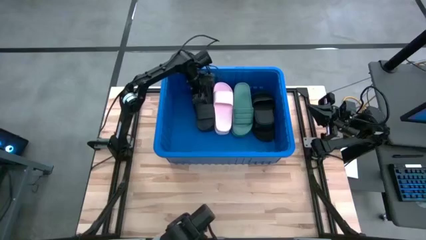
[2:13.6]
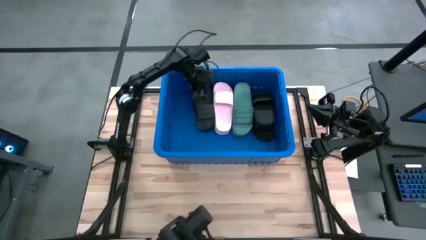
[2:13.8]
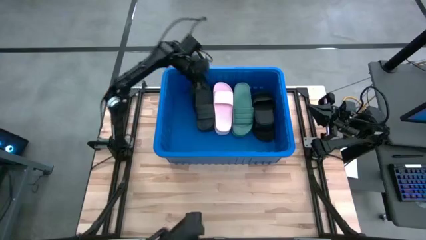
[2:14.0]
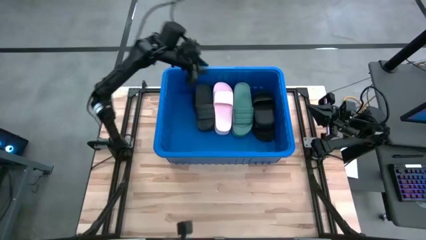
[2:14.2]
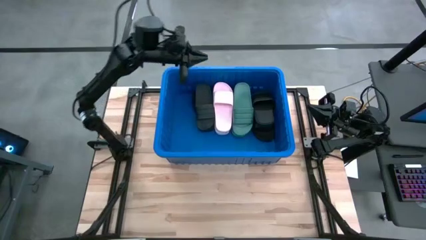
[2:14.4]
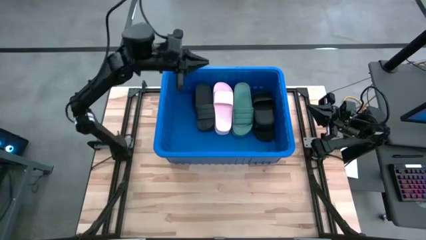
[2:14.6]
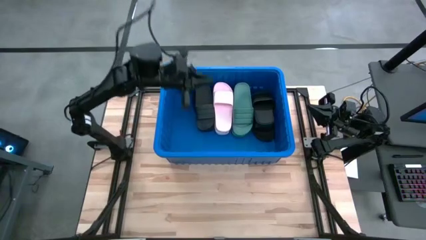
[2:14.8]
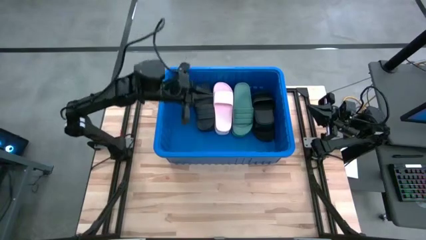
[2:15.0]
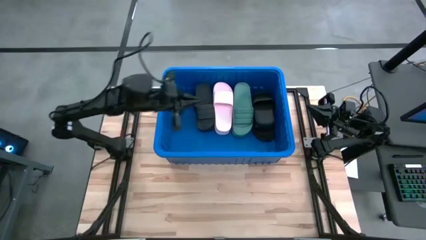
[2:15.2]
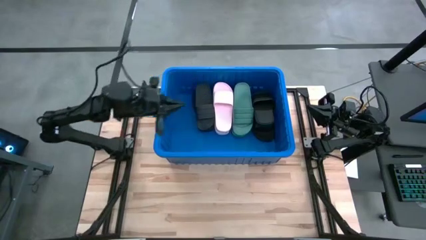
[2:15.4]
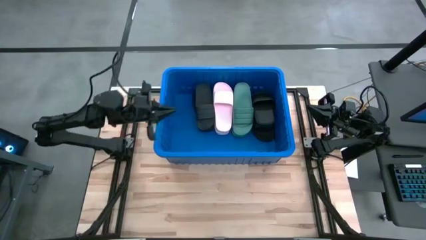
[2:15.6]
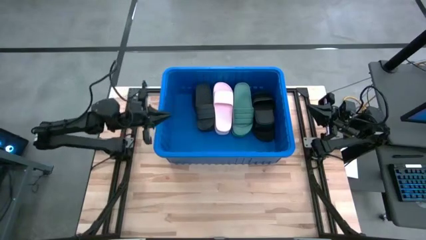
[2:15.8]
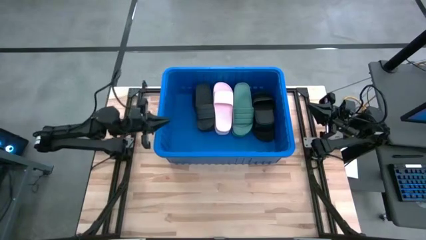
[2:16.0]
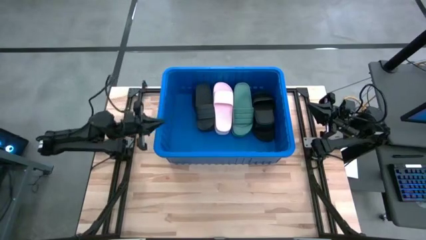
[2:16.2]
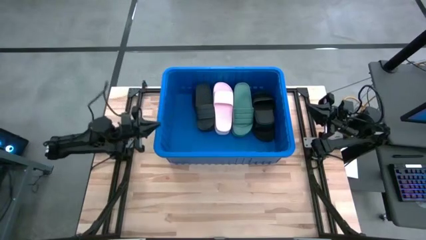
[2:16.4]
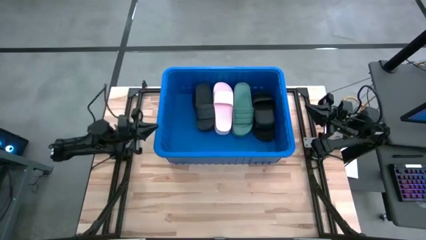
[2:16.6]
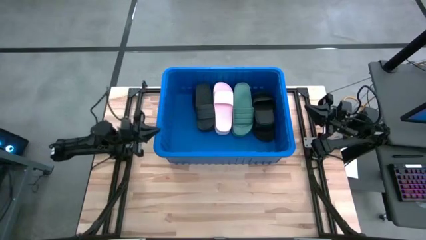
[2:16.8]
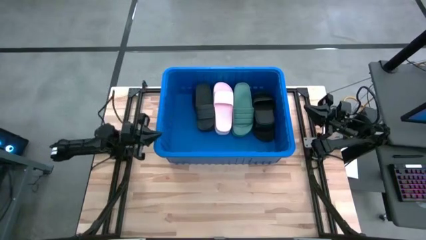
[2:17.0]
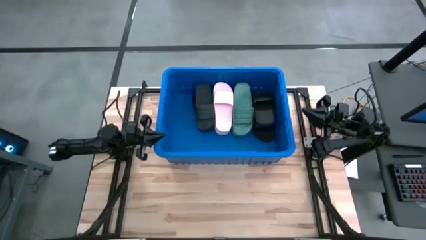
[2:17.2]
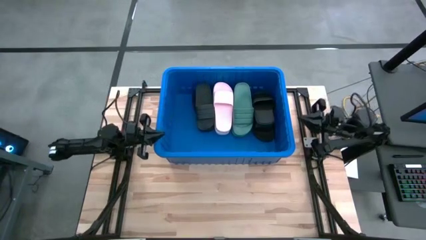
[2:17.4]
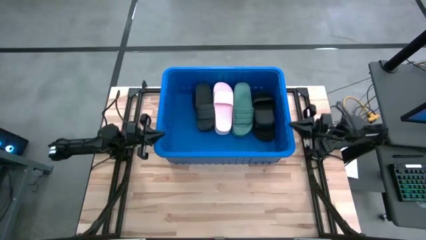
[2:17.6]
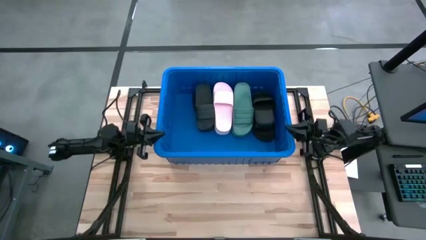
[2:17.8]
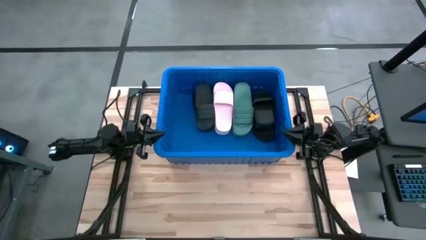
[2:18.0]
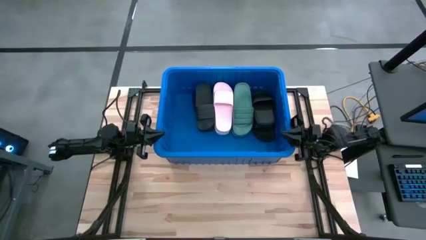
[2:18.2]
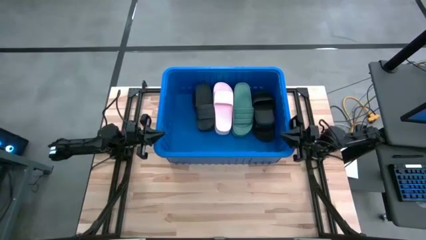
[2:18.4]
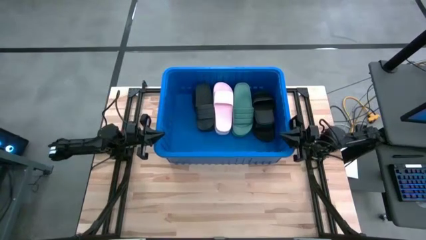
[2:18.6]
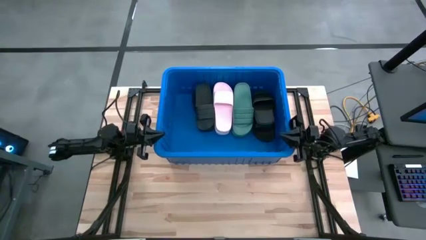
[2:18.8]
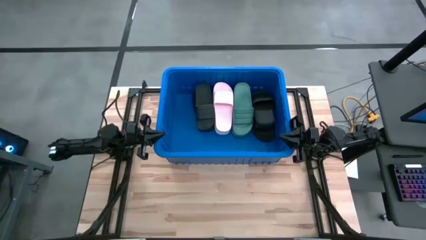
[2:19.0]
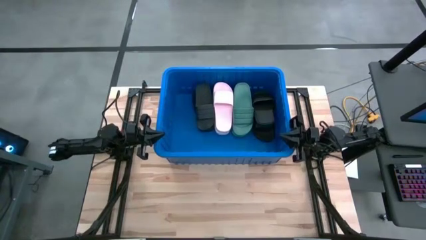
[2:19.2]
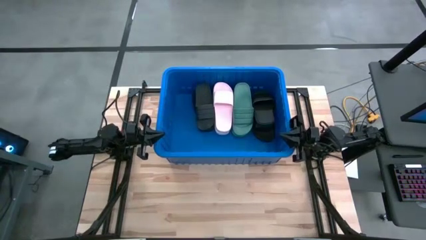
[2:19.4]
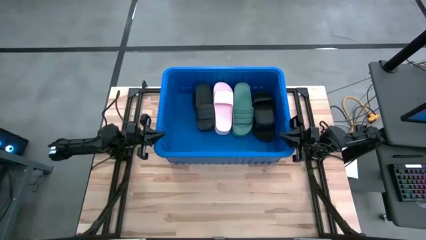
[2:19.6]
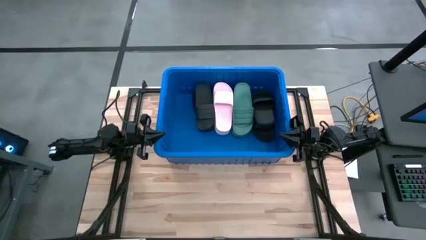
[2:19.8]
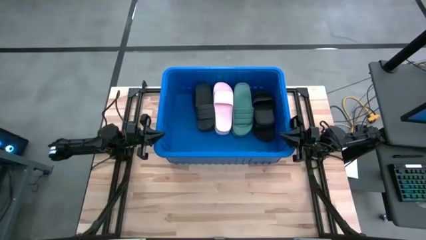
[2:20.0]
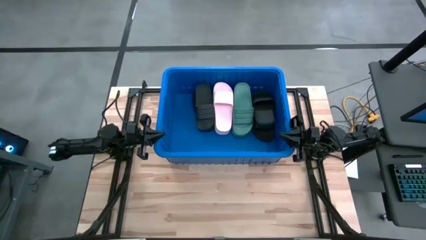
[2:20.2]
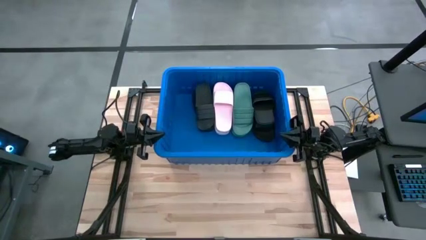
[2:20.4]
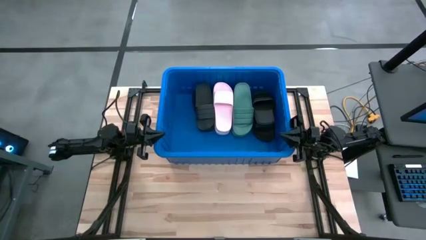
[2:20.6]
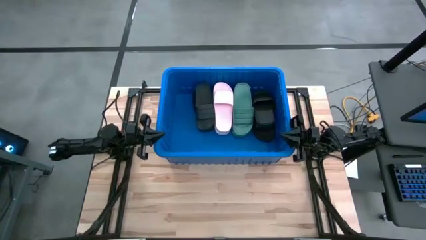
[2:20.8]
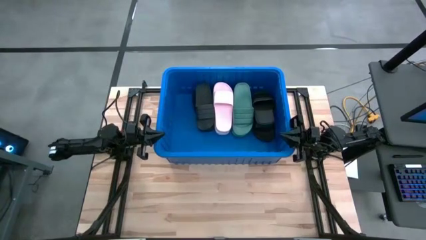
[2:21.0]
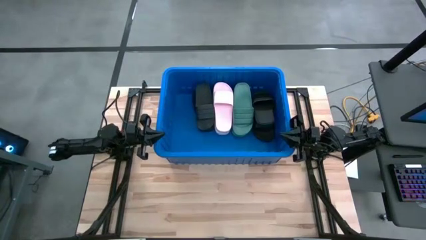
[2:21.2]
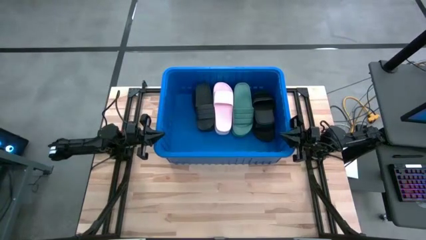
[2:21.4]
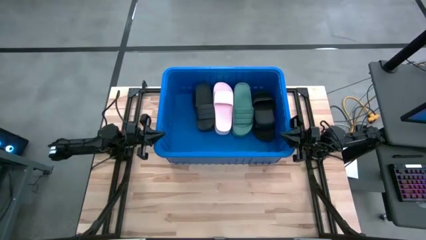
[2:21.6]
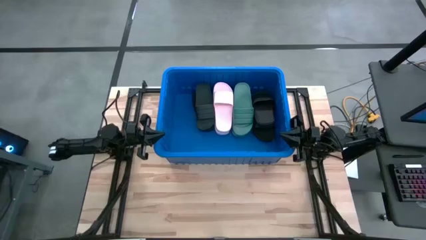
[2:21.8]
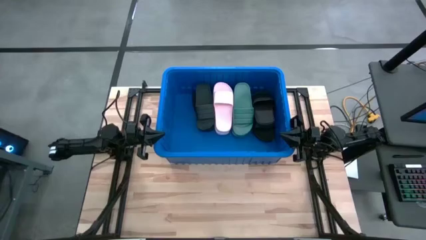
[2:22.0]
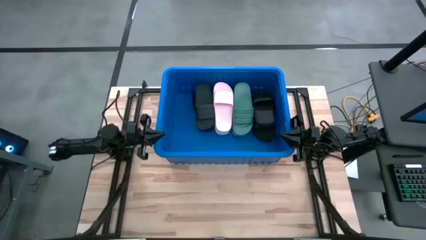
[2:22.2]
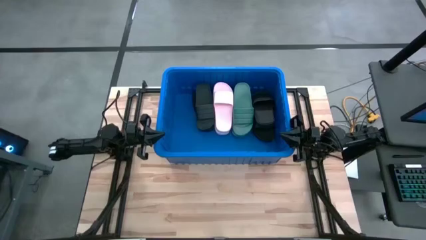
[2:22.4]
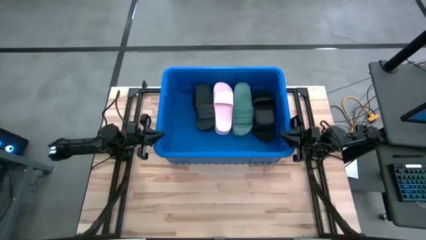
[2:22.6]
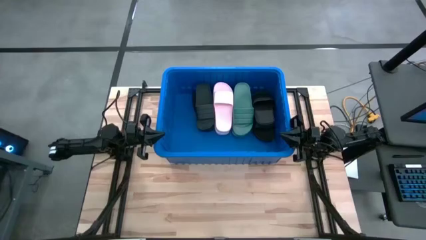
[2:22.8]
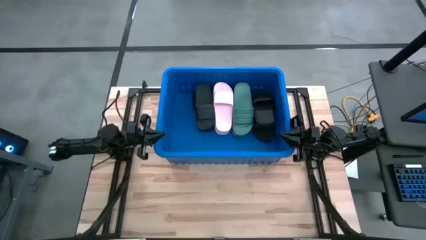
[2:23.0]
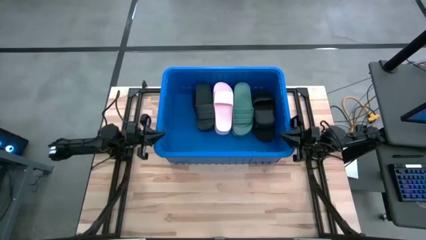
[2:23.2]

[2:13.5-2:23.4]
Task: Pick and place slides into bin
Return to Home Position

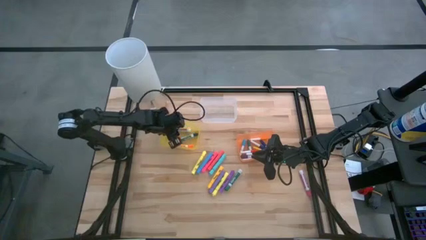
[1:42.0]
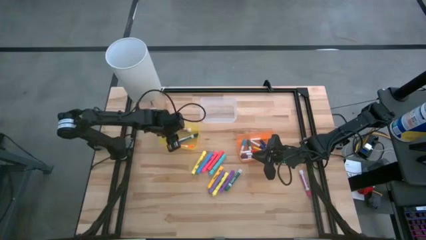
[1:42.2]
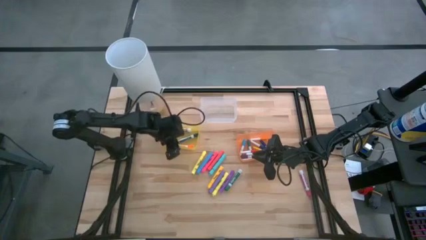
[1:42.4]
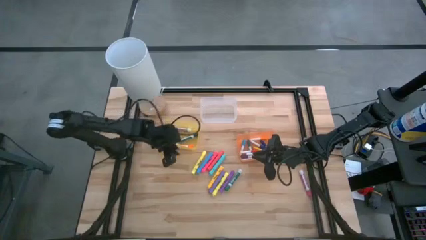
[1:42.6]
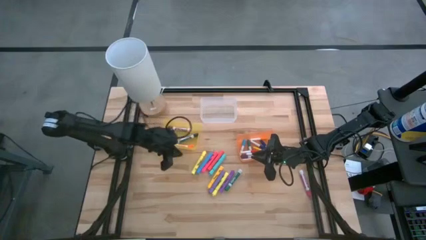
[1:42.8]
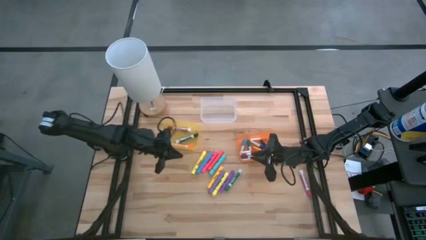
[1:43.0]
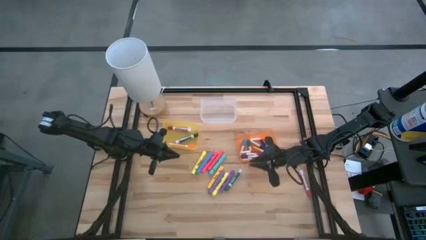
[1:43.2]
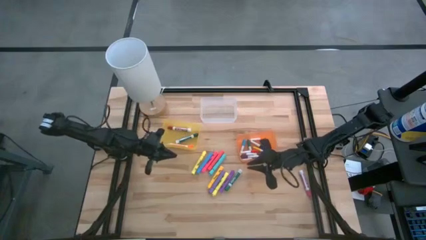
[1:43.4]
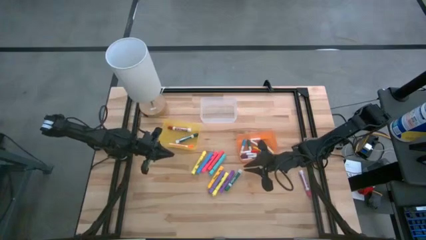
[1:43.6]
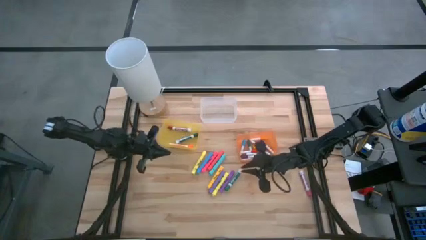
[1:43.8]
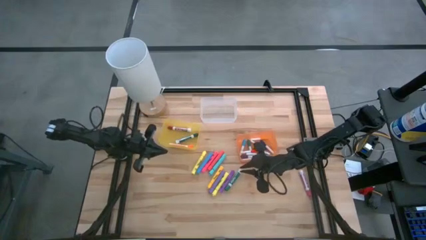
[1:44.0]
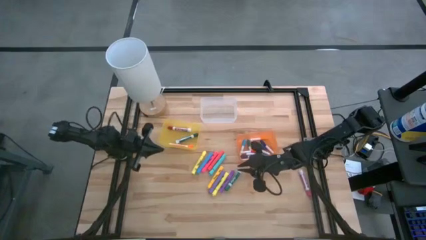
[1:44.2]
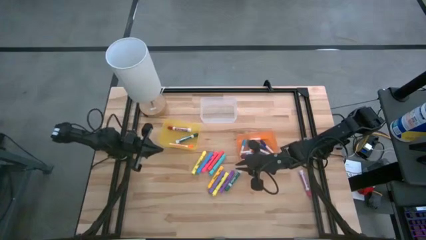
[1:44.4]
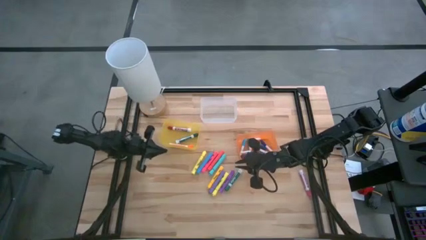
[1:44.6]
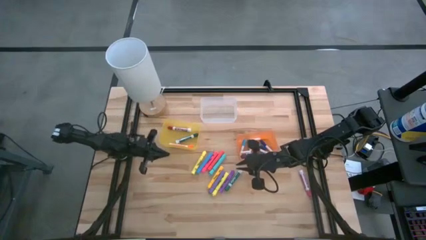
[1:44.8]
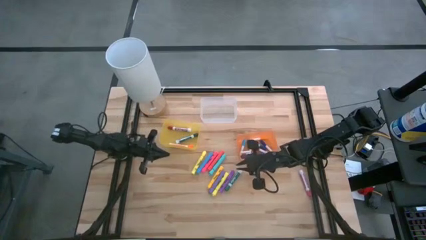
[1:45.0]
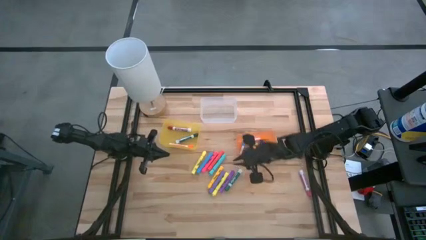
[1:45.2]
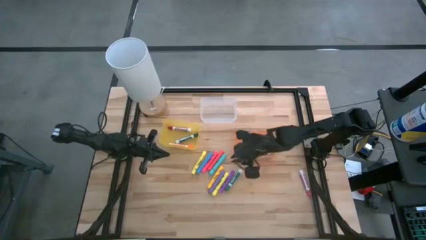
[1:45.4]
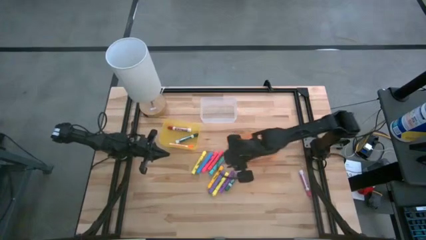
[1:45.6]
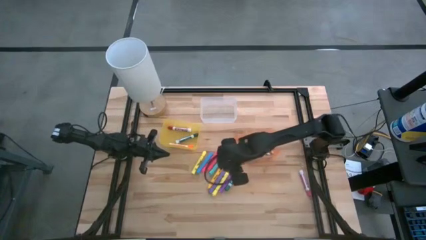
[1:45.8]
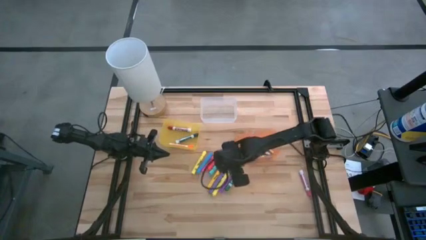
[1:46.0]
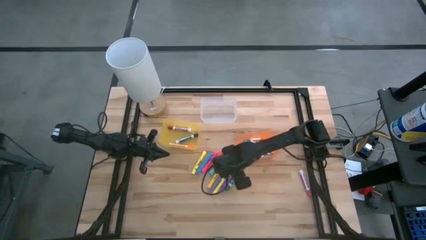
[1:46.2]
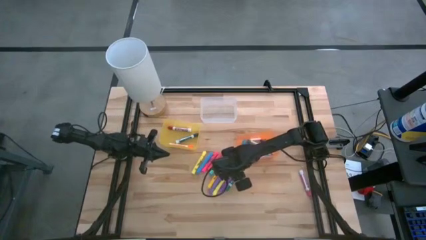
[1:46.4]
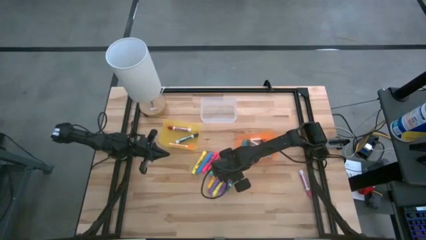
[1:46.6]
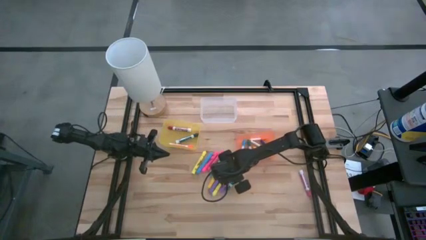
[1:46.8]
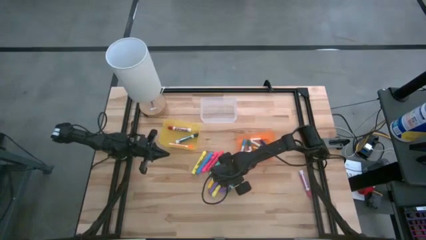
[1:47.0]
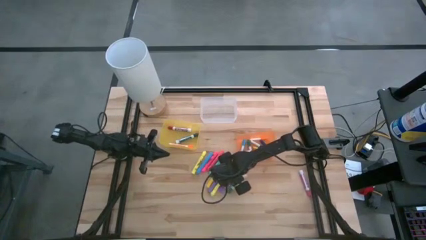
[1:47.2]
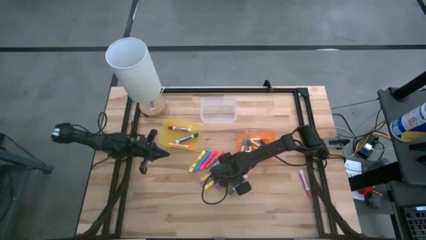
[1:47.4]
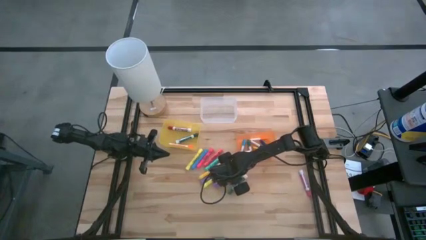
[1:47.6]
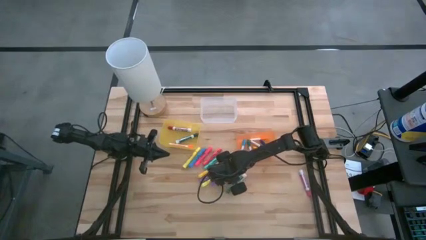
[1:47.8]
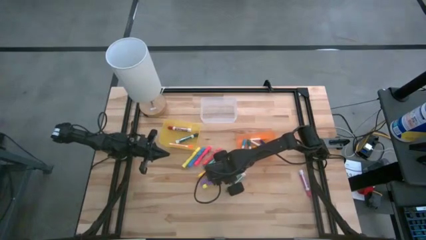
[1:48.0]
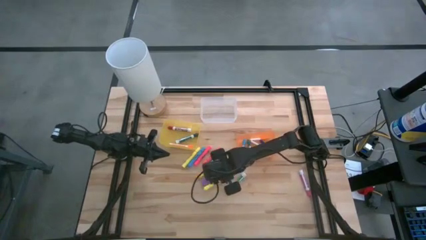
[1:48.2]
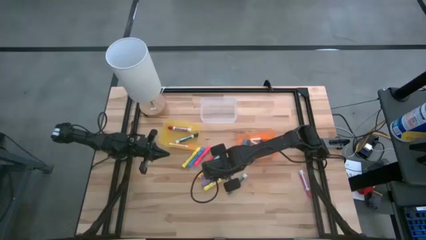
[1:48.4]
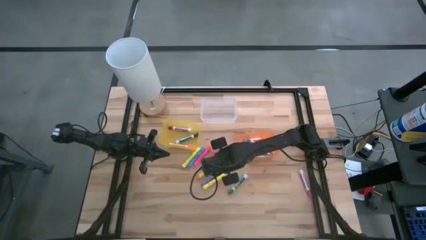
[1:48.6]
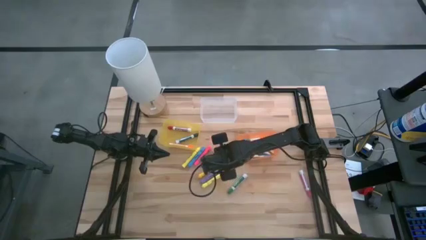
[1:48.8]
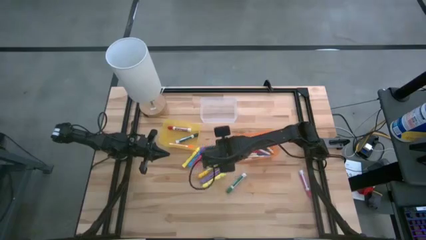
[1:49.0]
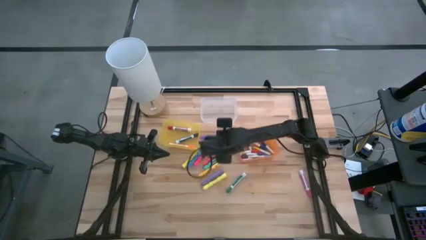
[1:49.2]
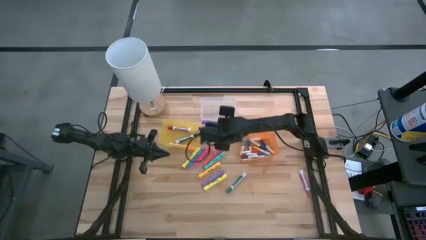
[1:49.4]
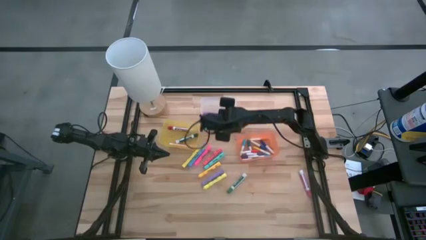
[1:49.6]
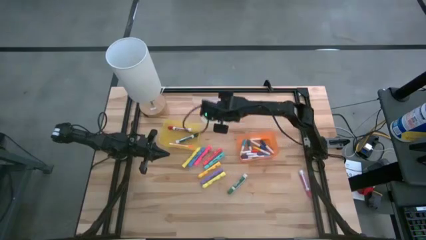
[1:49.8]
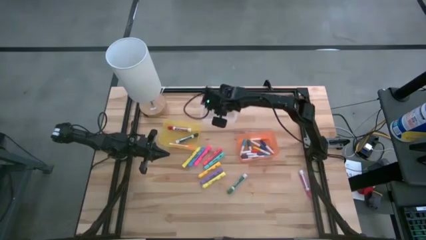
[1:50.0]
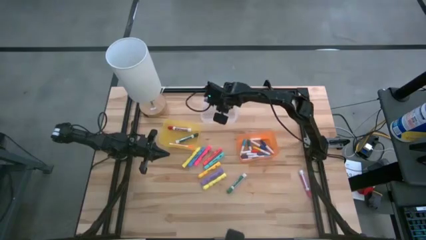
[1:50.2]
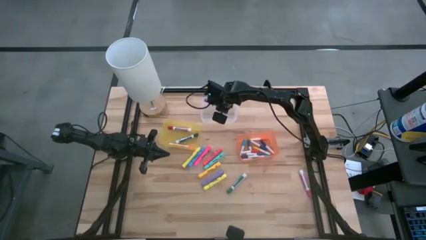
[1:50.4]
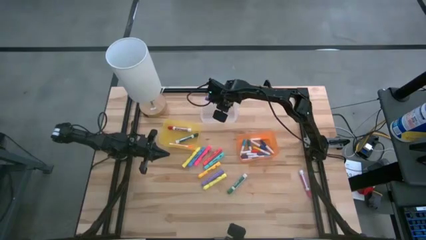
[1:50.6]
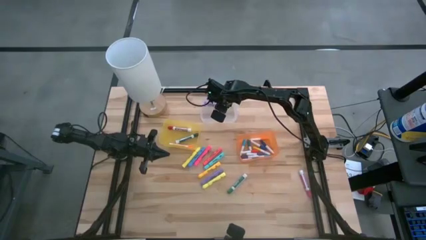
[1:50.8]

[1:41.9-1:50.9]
Task: Pick & Place Markers
Put the large purple highlighter pen into the transparent bin
